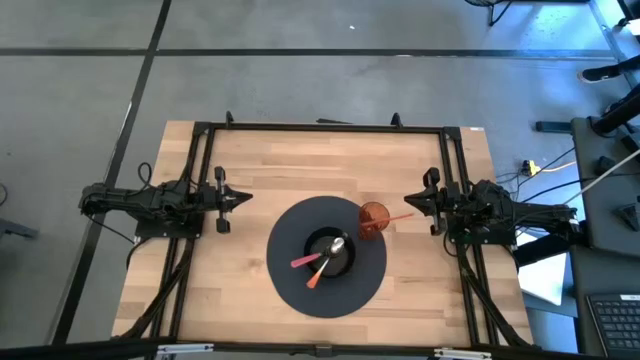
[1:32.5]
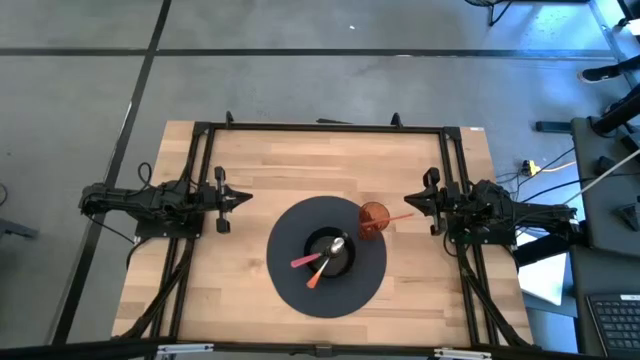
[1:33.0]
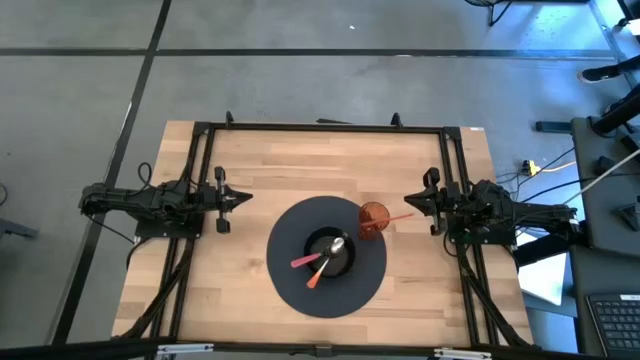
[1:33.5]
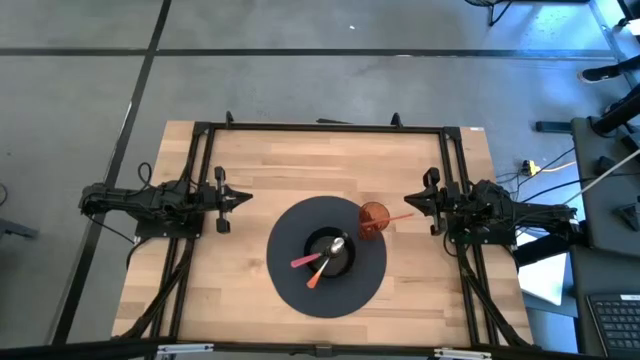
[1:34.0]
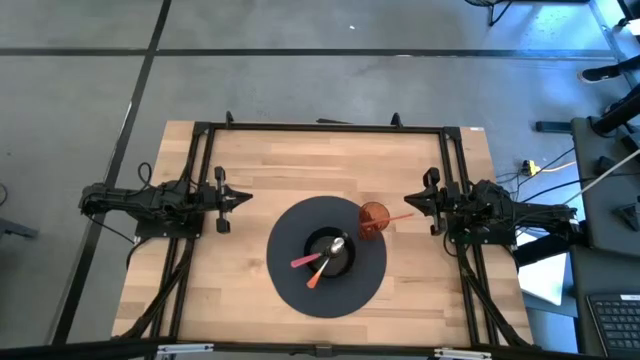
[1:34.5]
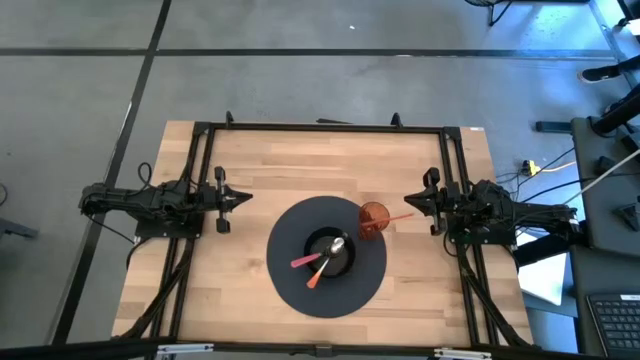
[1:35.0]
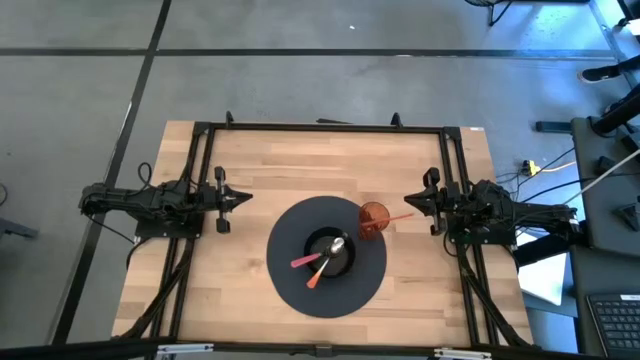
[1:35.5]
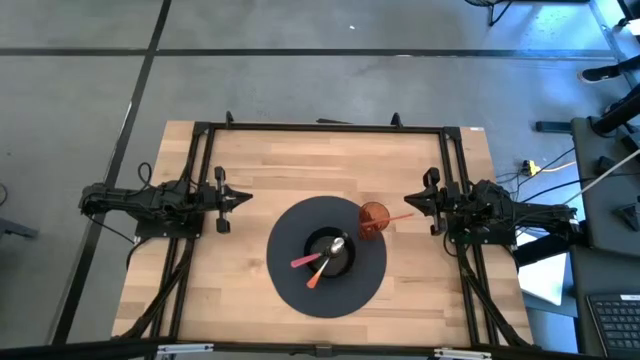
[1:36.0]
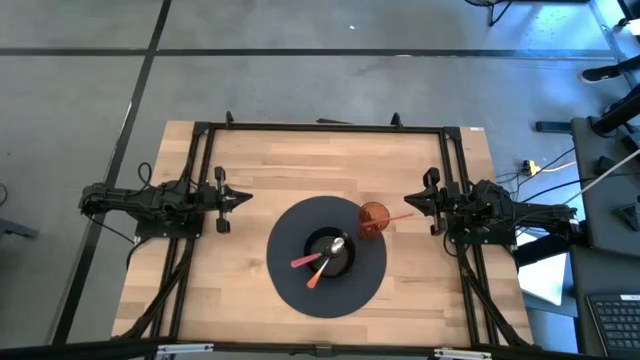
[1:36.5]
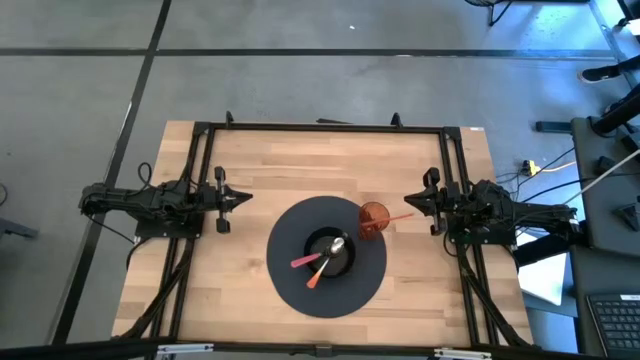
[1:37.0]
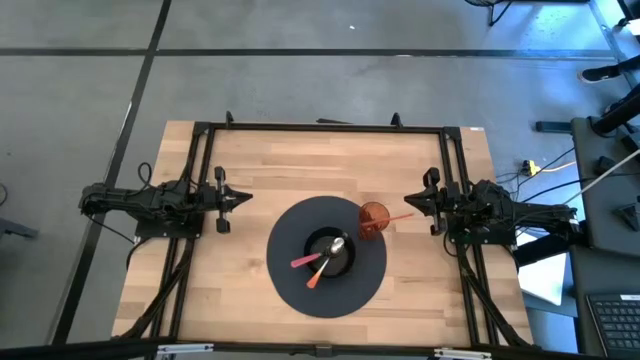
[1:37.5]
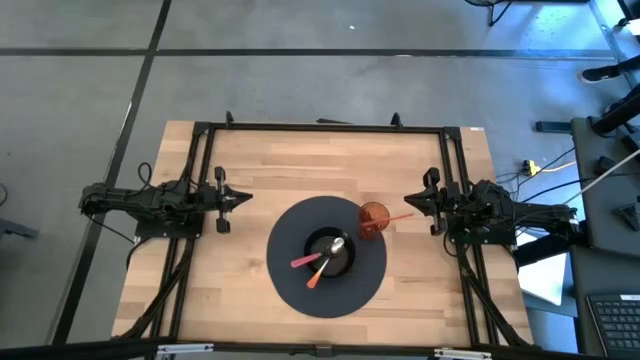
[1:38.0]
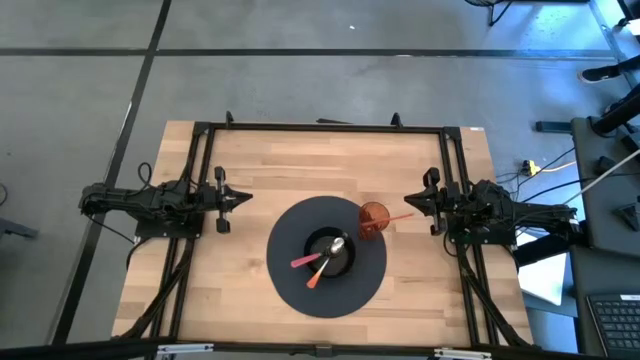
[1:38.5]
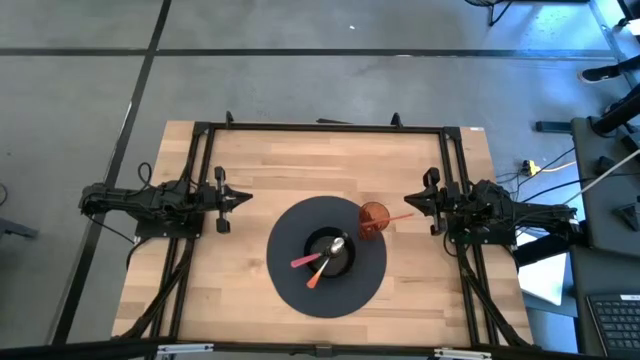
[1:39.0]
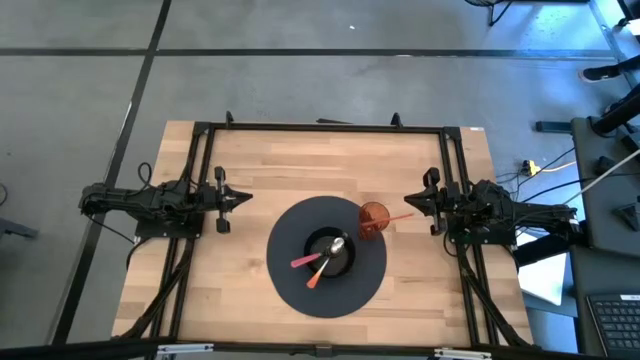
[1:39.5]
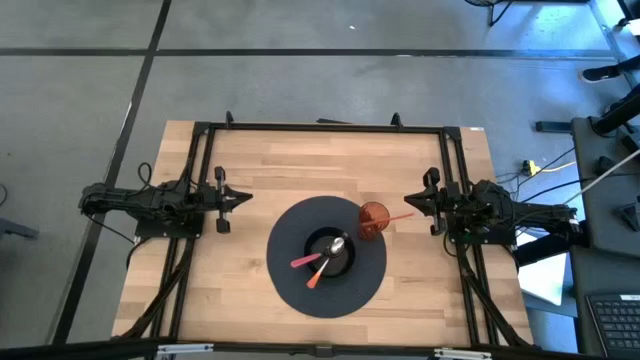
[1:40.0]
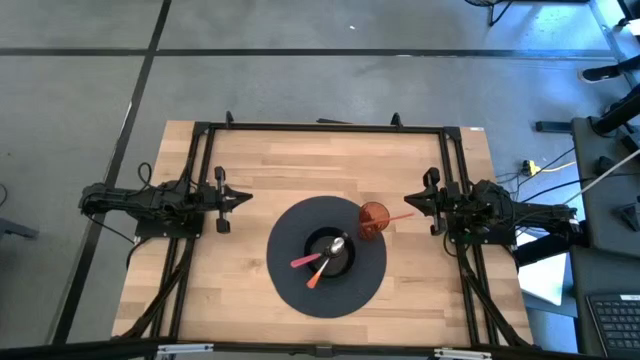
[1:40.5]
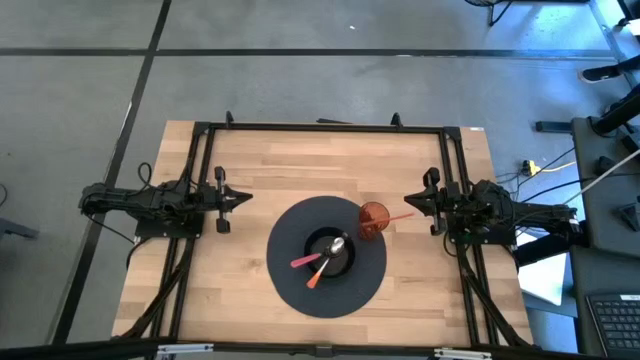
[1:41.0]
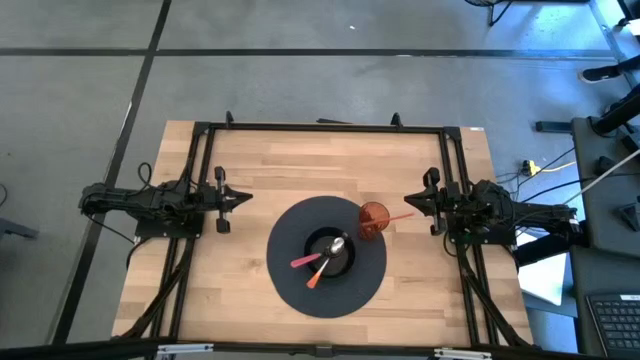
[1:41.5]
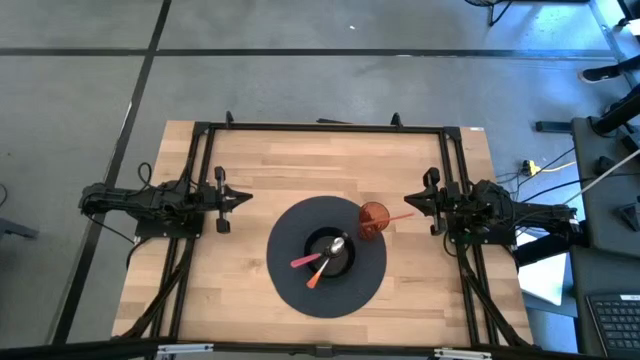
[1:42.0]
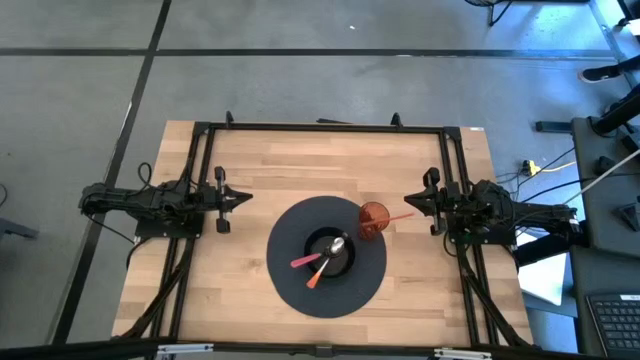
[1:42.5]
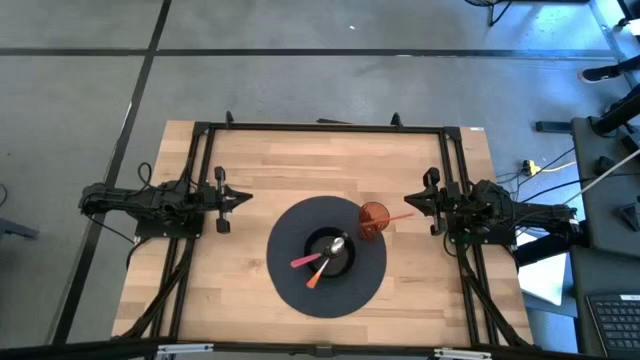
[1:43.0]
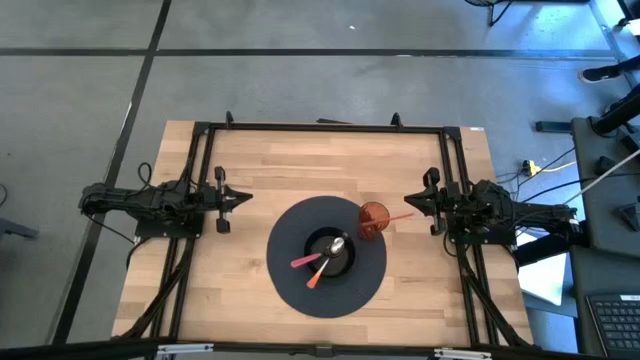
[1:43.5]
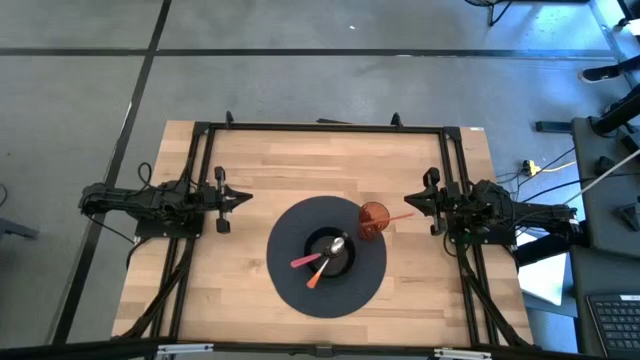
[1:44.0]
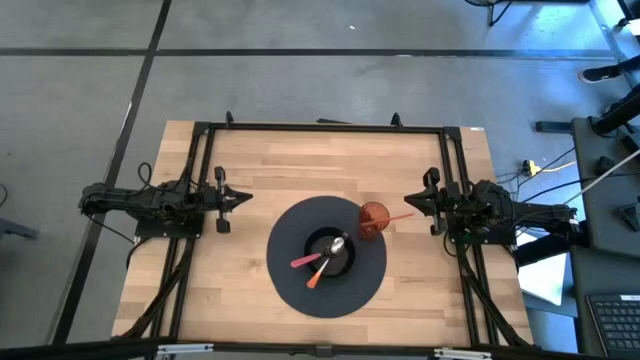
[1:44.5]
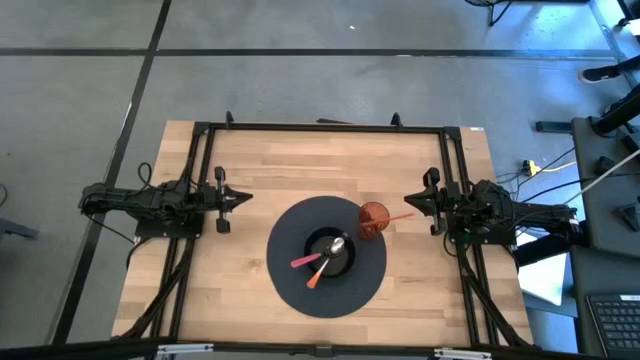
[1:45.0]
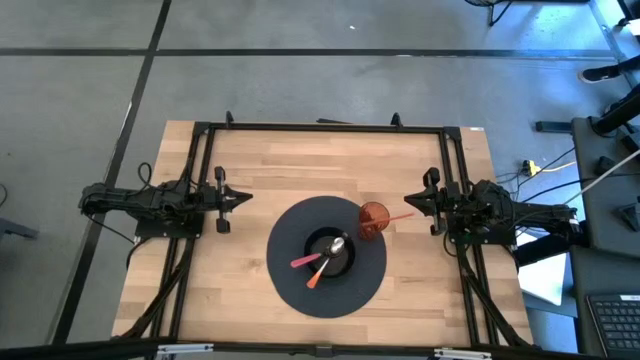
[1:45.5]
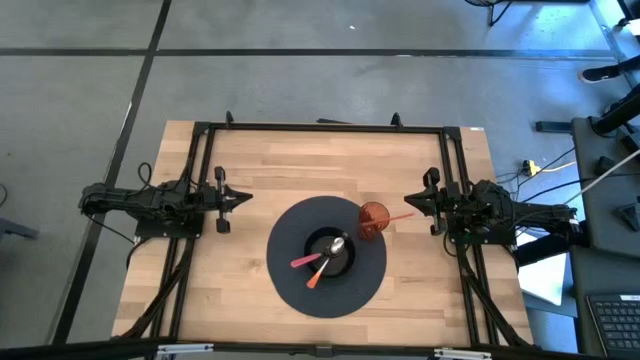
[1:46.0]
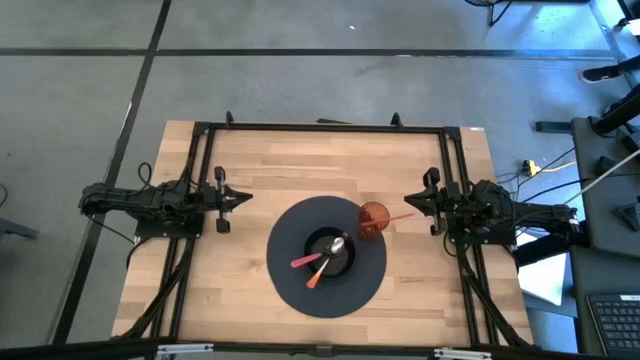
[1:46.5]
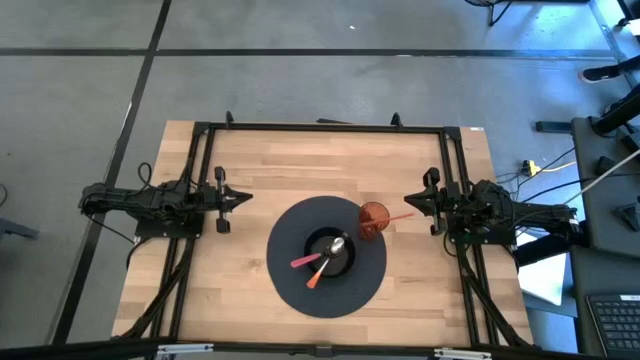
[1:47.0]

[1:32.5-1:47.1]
Task: Pick & Place Utensil
Return to Home Position

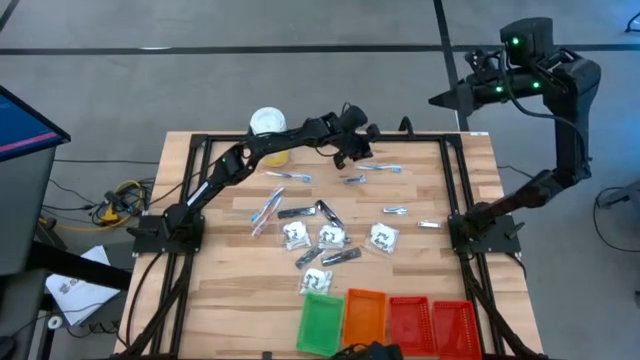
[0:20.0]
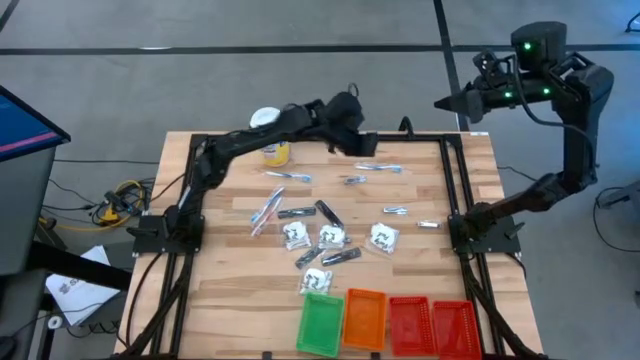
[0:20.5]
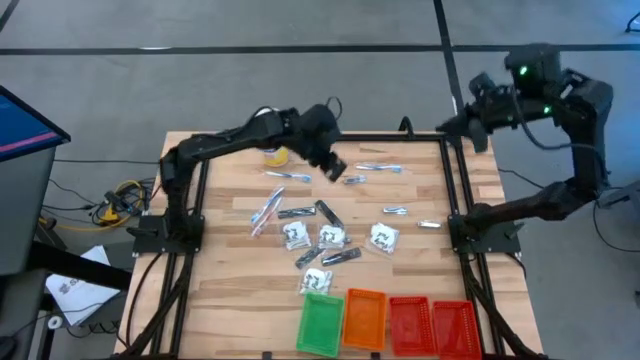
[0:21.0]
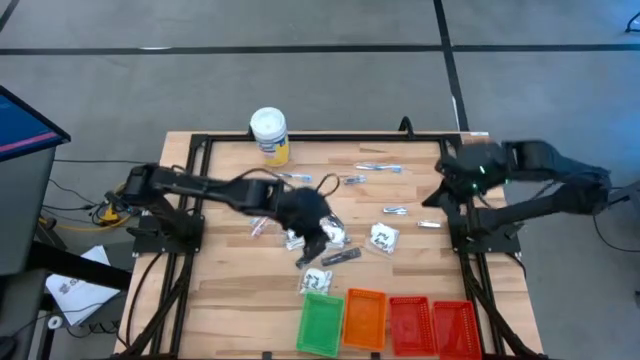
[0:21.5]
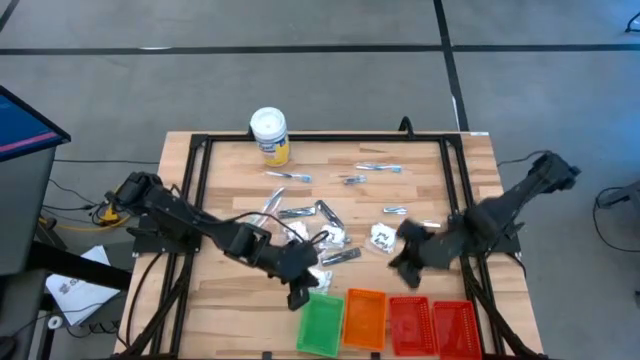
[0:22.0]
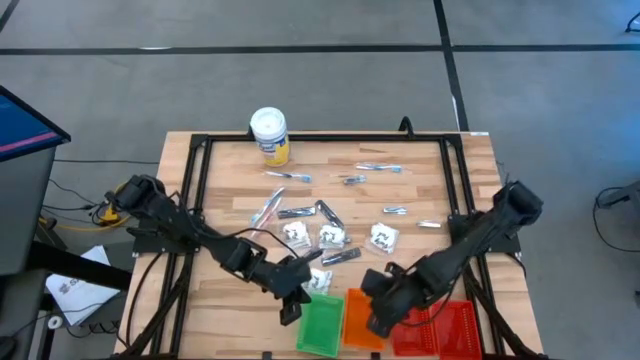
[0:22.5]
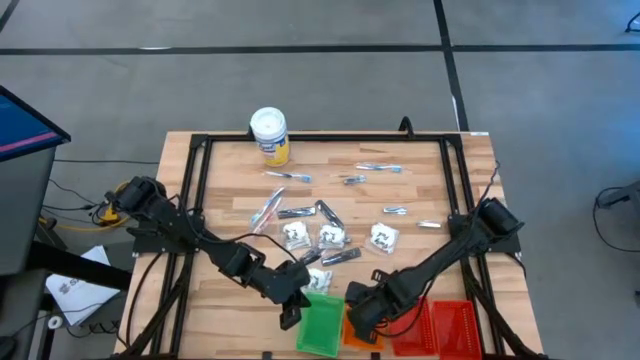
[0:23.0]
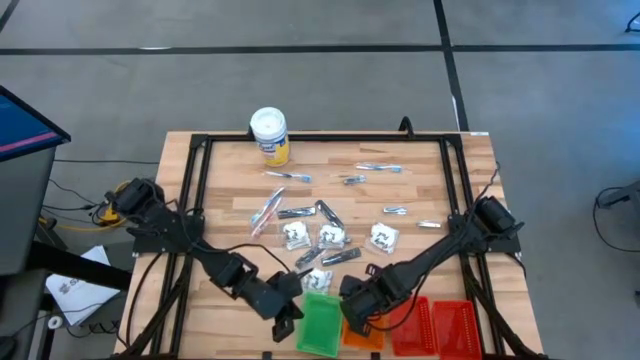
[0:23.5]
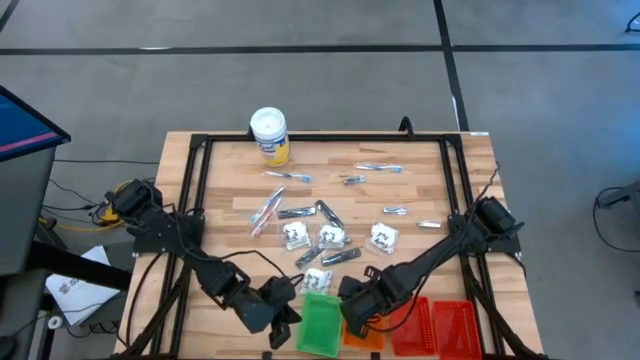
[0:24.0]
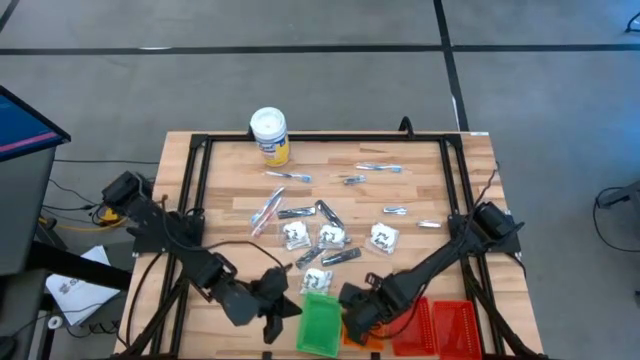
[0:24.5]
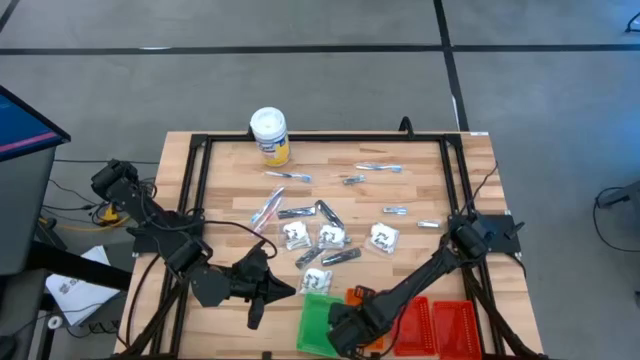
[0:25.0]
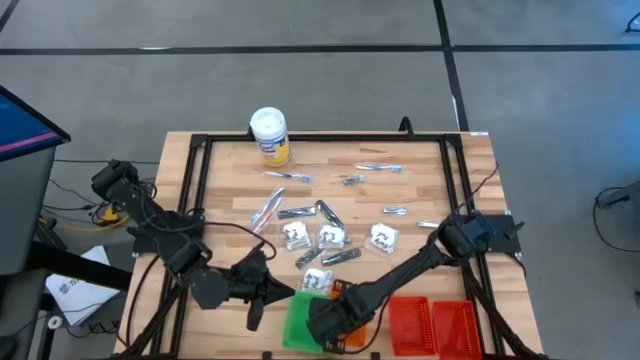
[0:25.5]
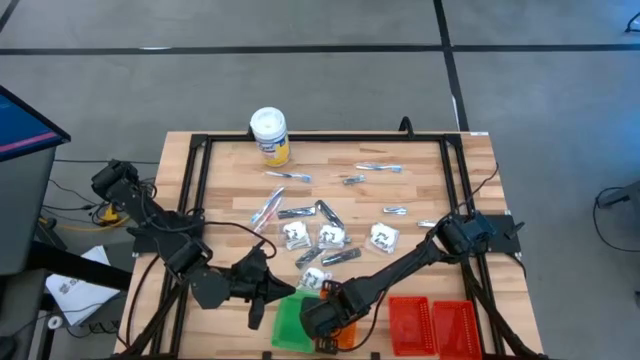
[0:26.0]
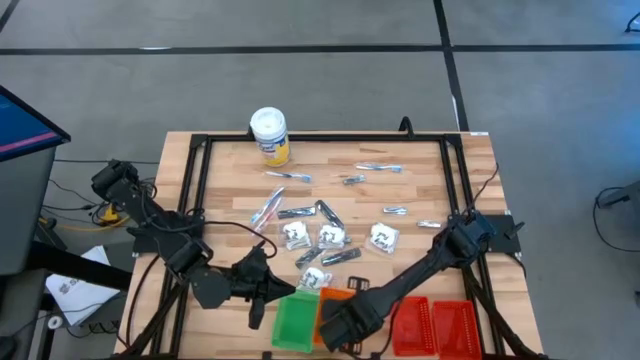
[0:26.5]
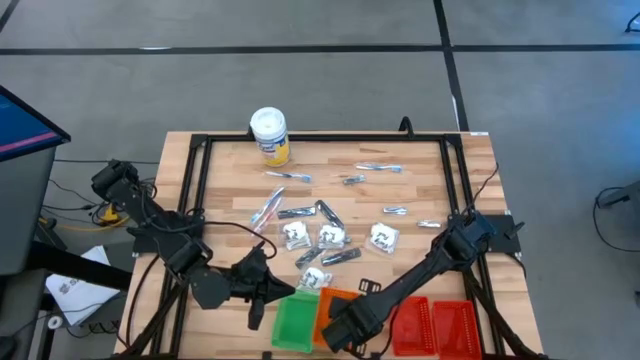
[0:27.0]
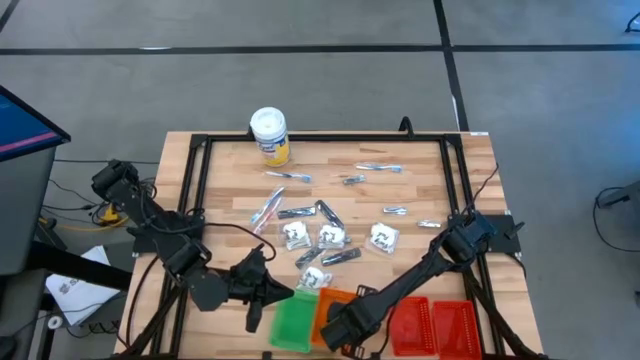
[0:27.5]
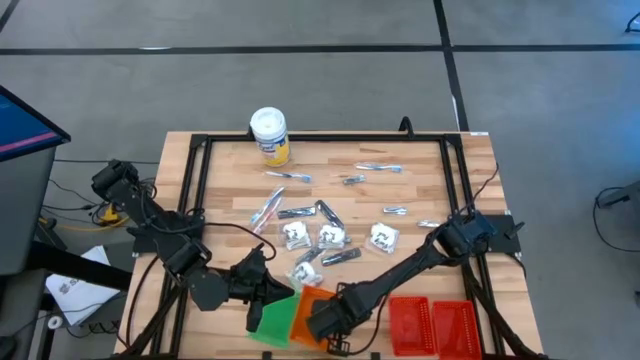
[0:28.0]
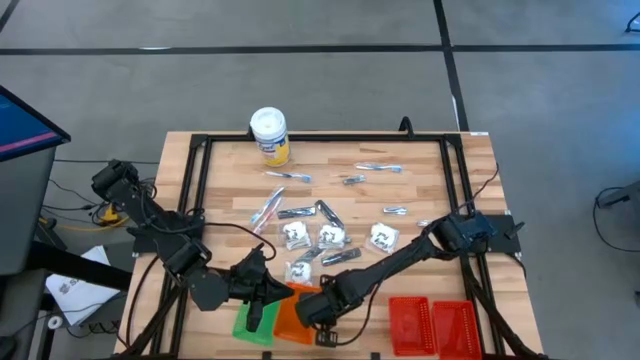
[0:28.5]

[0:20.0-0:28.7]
Task: Pick & Place Travel size toiletries
Adjust the orange bin
